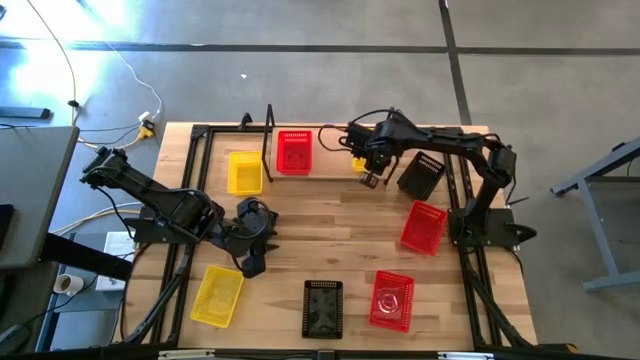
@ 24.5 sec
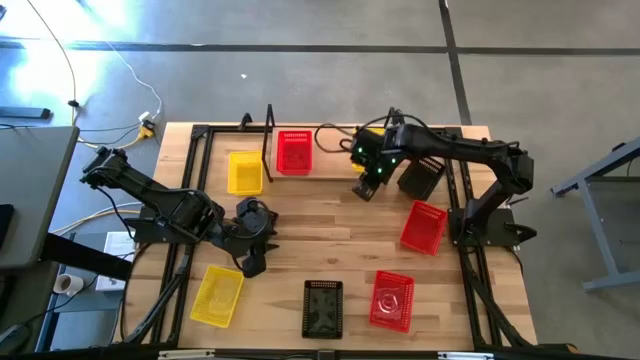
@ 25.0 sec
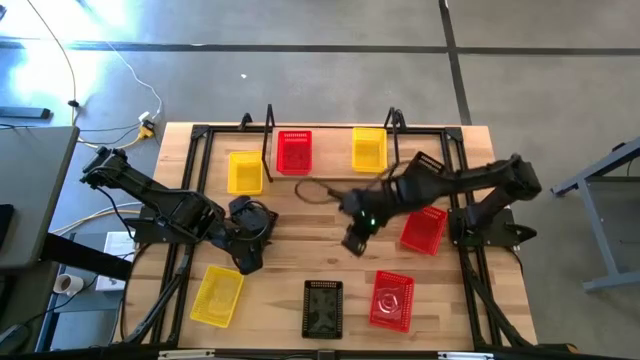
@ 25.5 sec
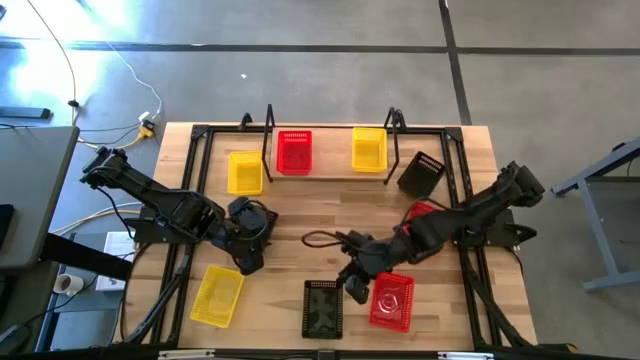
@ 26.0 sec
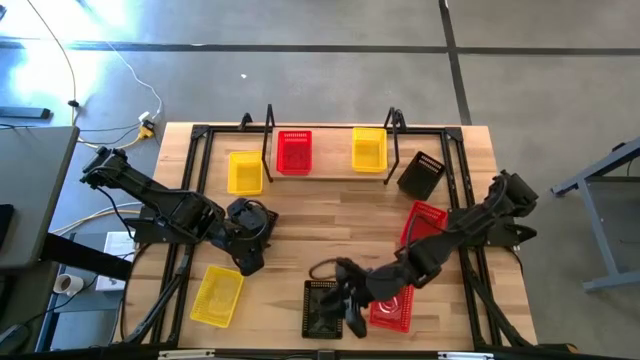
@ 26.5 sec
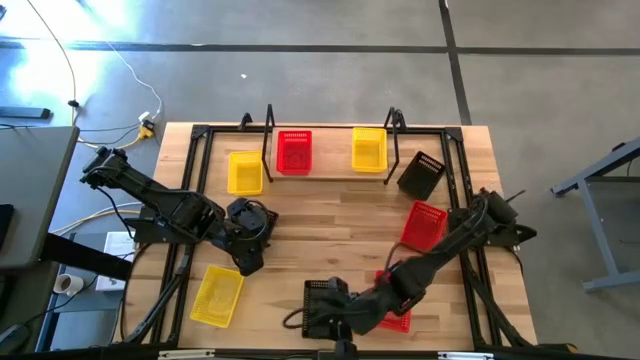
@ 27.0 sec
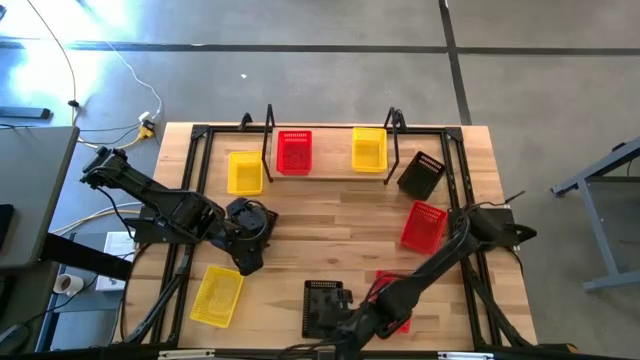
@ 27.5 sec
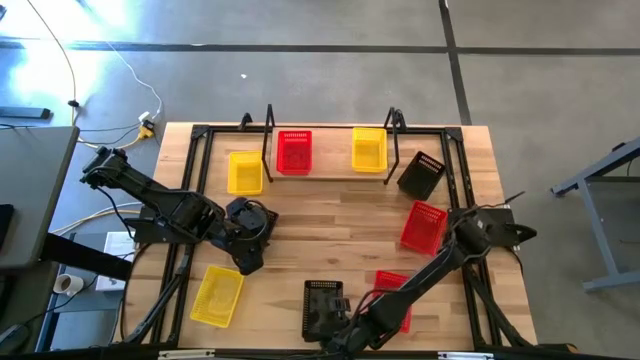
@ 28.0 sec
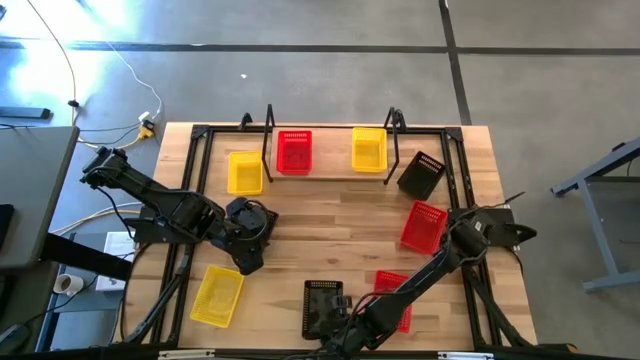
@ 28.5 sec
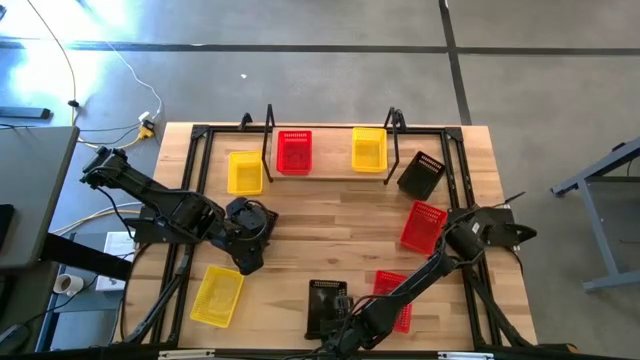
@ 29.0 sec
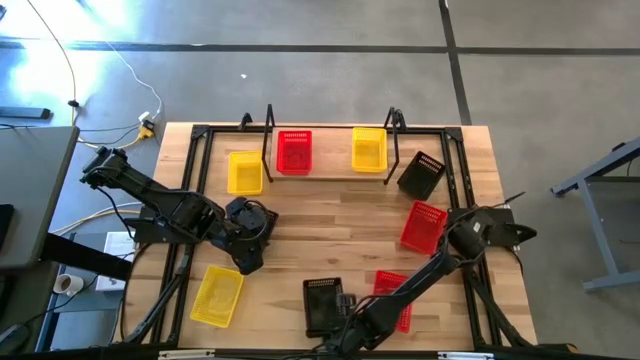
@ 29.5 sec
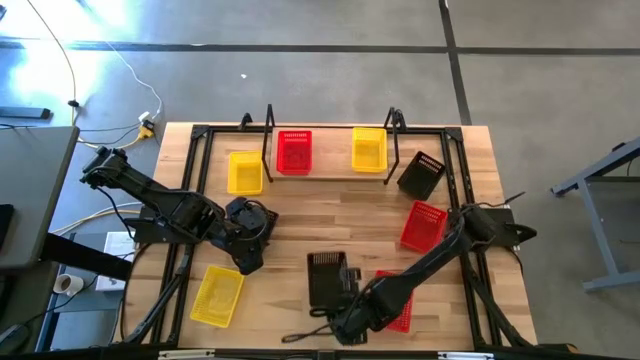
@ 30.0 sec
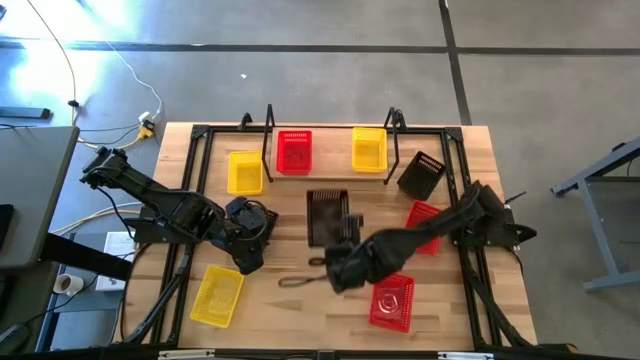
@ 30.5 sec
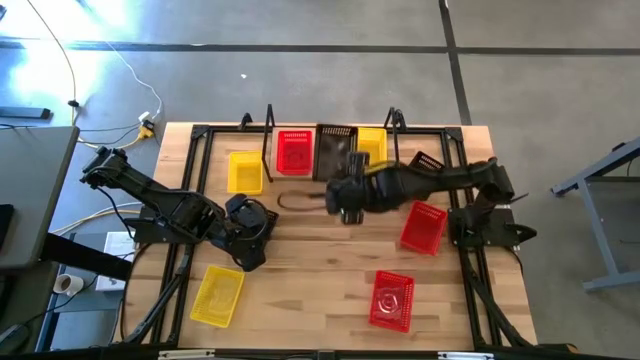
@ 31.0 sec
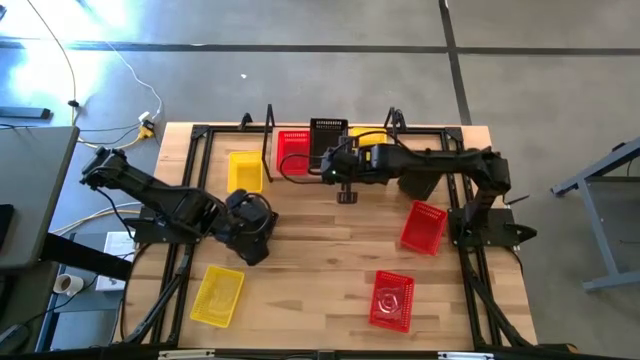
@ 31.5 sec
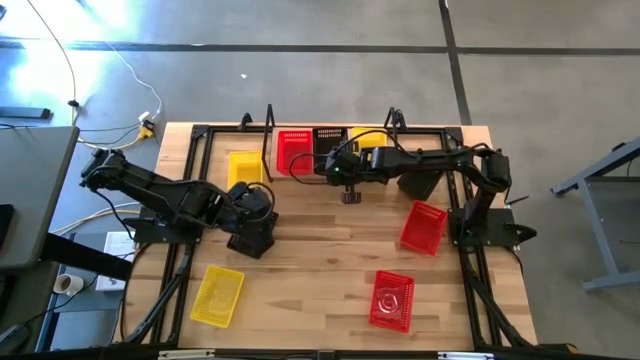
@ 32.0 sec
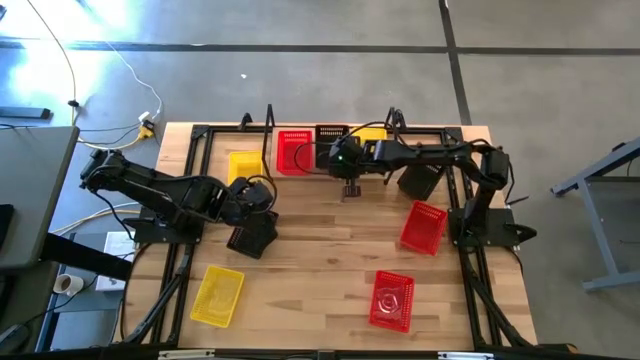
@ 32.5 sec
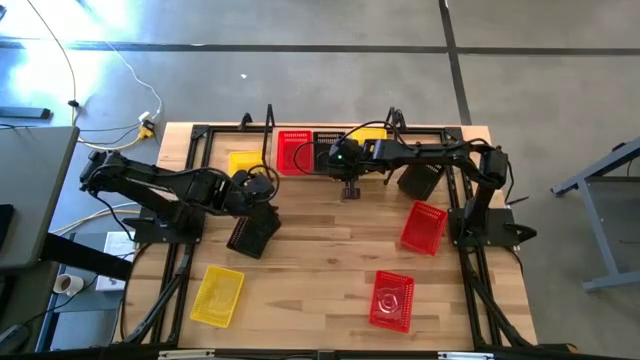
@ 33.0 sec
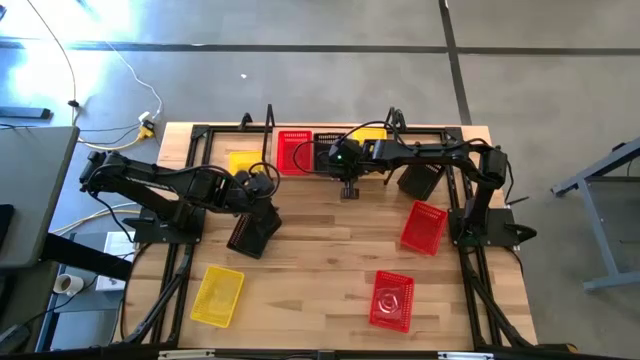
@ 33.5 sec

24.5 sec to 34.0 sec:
Task: Stack baskets on shelf by color
Put the bottom black bin on the shelf

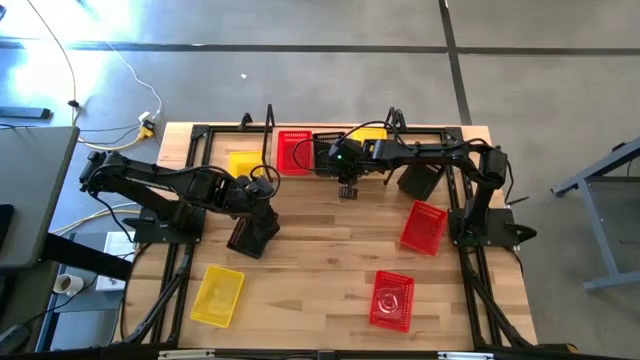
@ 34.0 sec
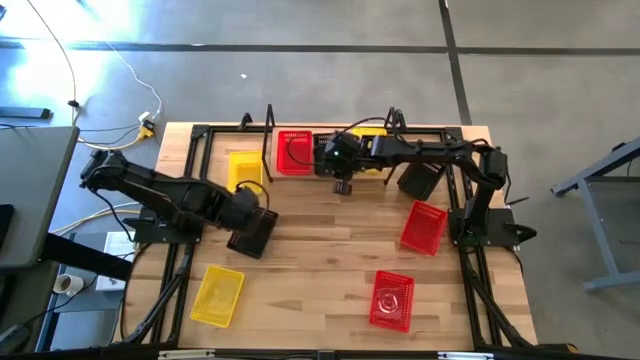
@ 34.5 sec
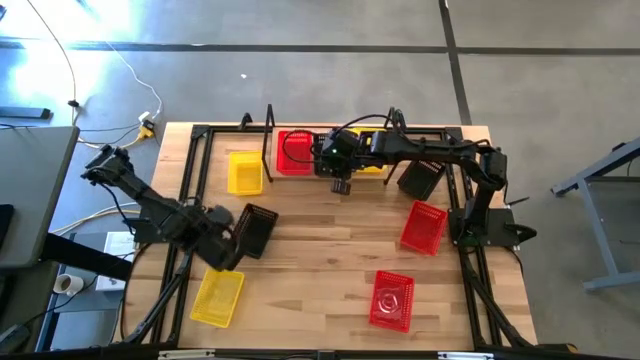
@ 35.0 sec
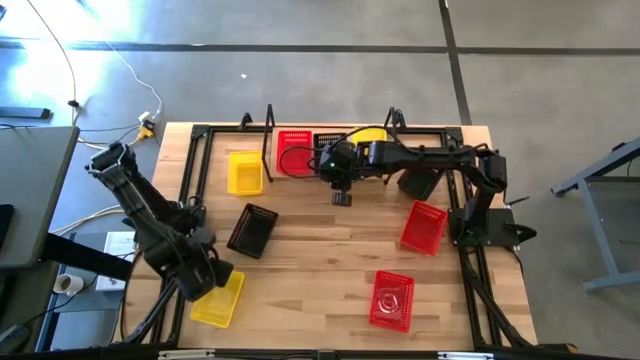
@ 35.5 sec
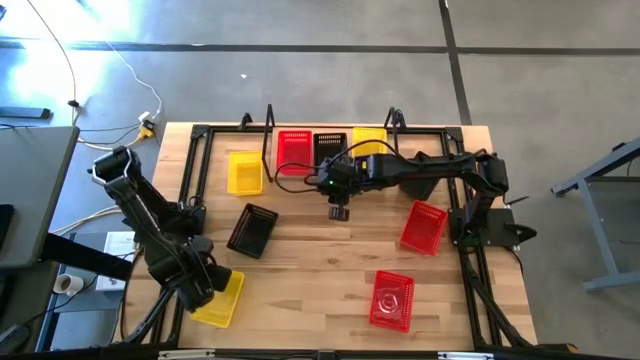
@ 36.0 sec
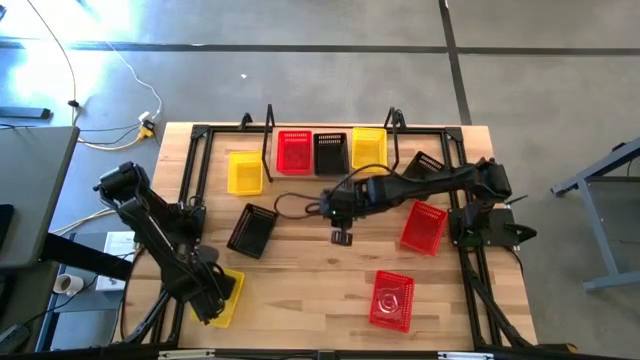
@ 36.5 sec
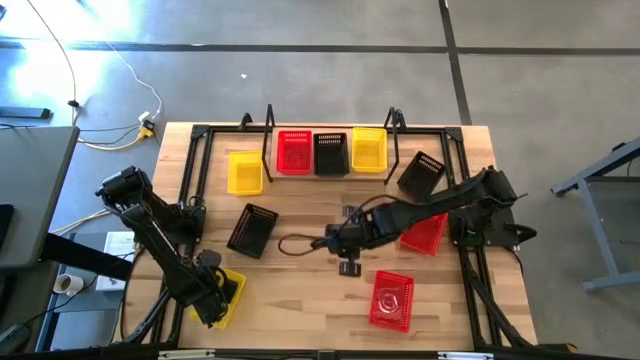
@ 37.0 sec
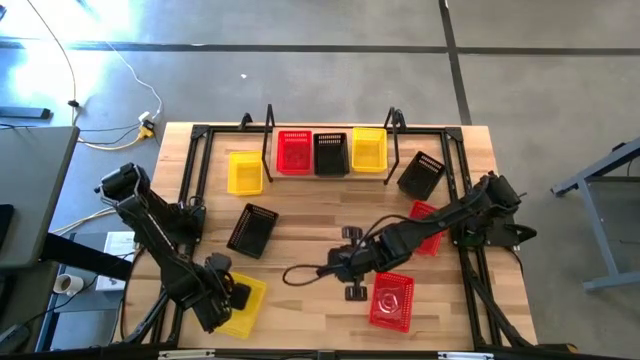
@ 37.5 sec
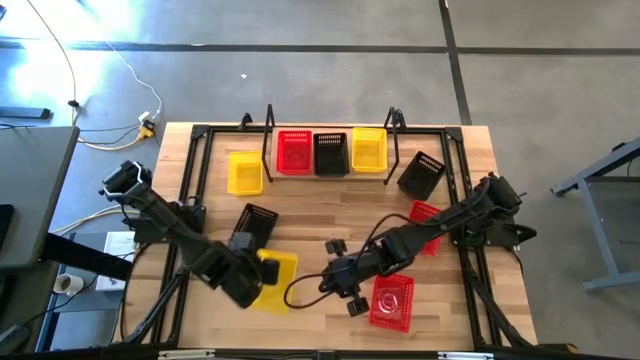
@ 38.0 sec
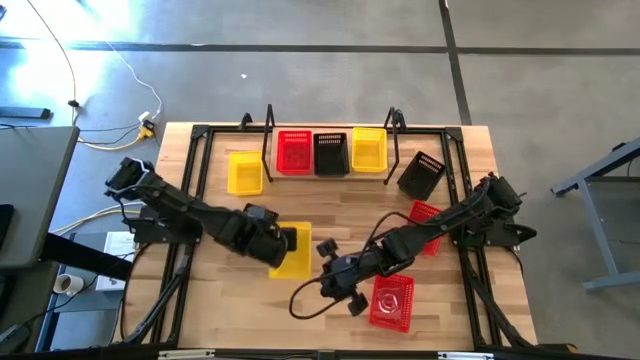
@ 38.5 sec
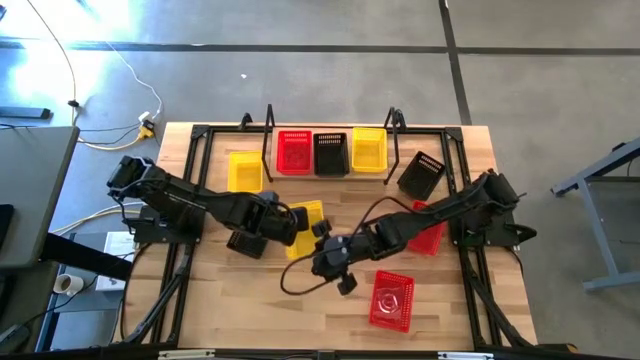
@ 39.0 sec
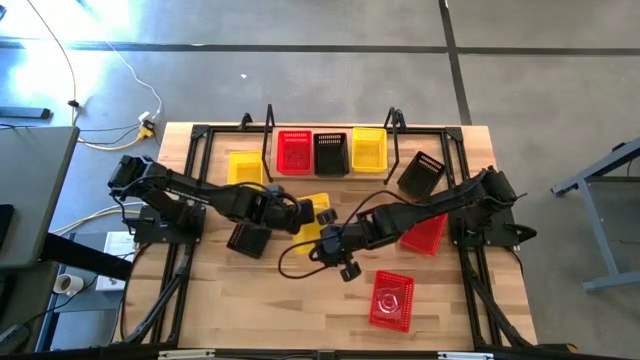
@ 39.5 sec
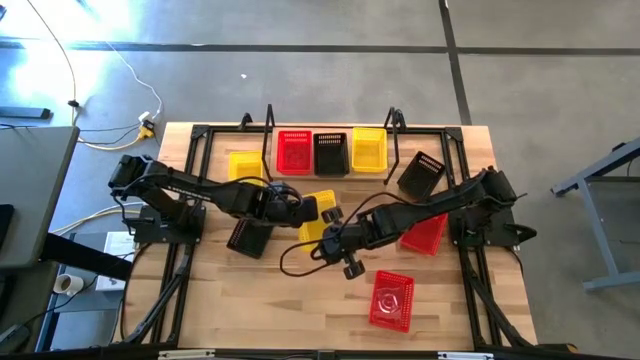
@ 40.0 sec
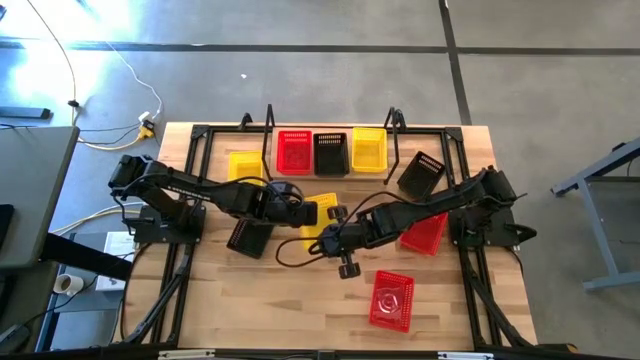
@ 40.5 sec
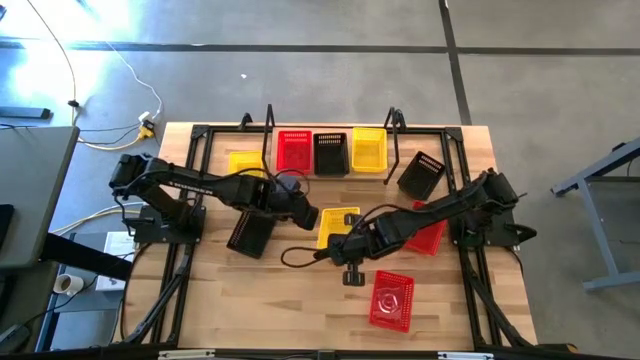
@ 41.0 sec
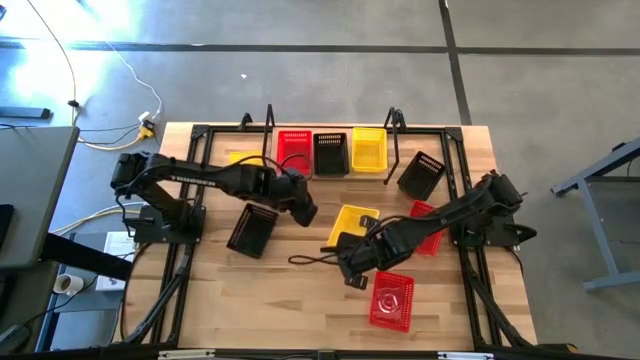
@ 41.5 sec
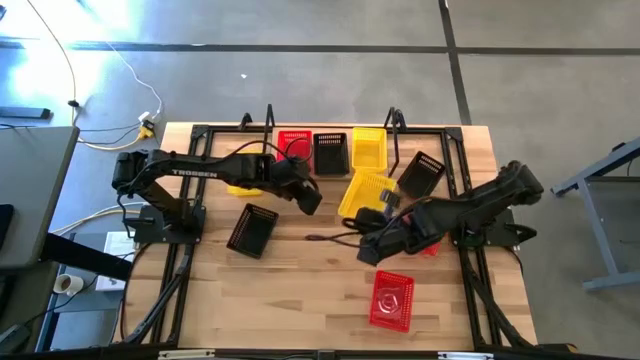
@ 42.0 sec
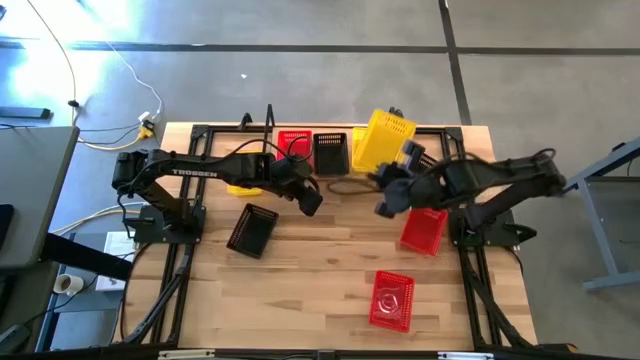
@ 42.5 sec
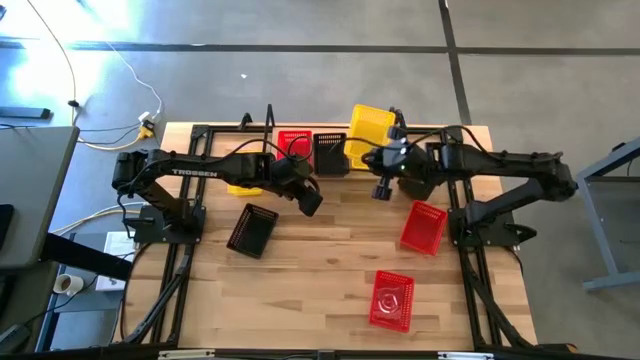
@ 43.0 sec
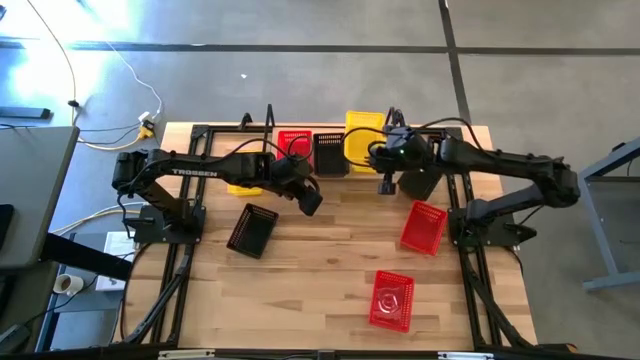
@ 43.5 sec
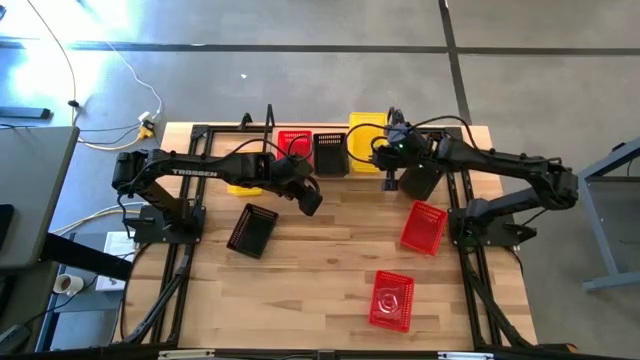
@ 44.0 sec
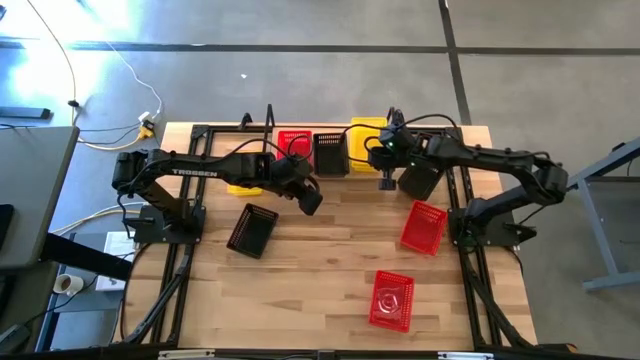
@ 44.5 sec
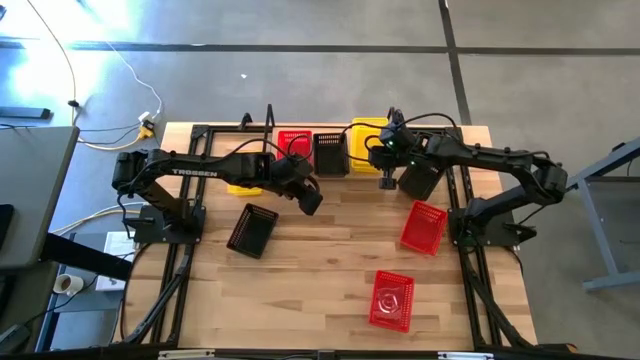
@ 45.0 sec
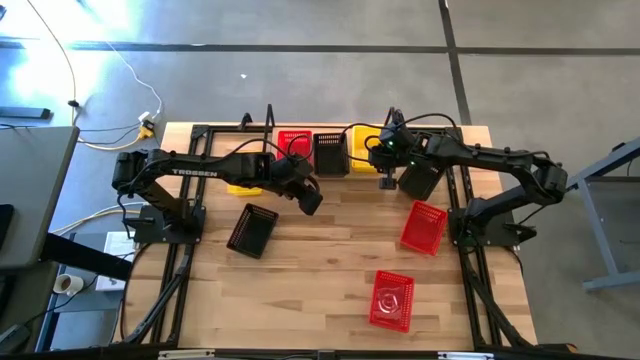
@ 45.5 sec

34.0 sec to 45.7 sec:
Stack the bottom yellow bin on the yellow bin on the shelf
